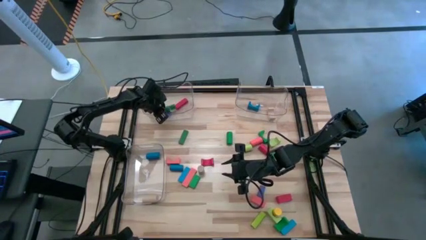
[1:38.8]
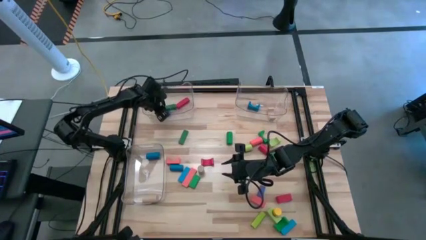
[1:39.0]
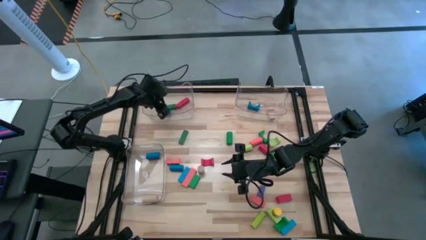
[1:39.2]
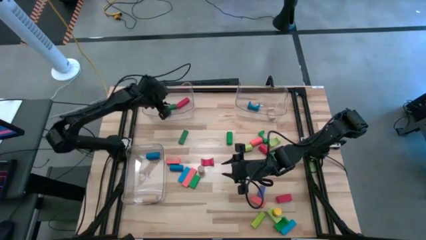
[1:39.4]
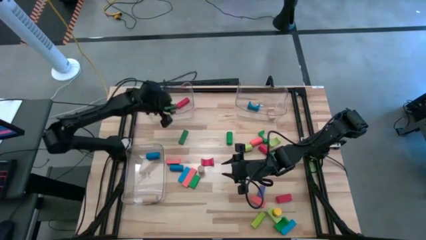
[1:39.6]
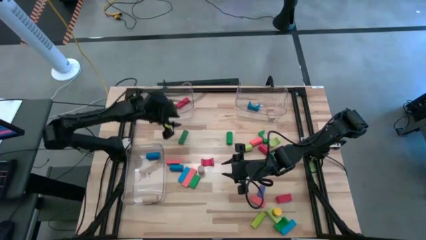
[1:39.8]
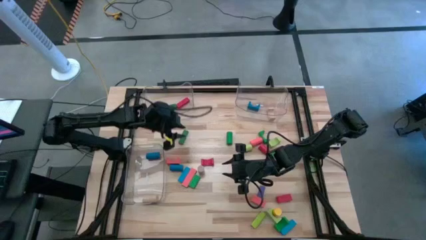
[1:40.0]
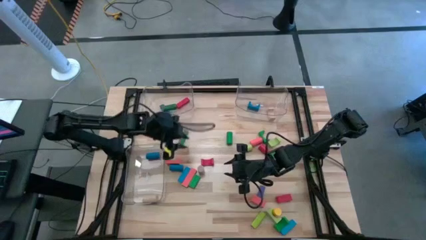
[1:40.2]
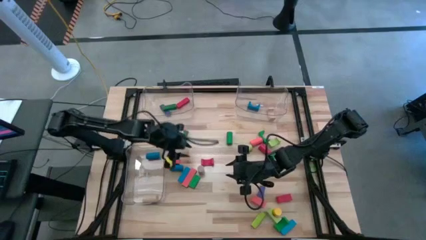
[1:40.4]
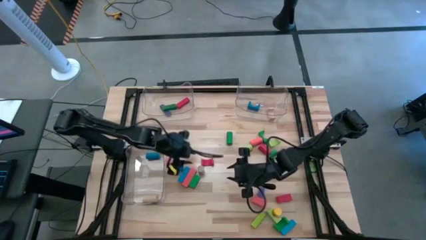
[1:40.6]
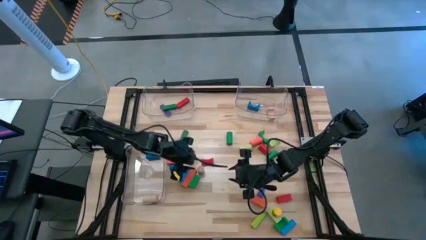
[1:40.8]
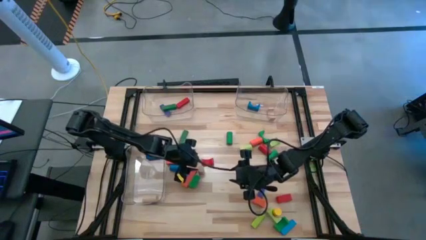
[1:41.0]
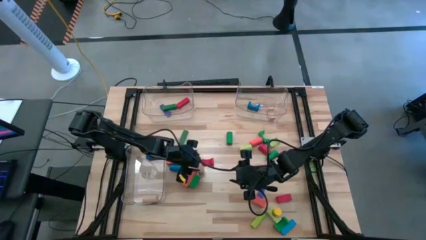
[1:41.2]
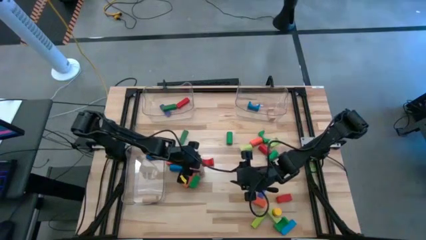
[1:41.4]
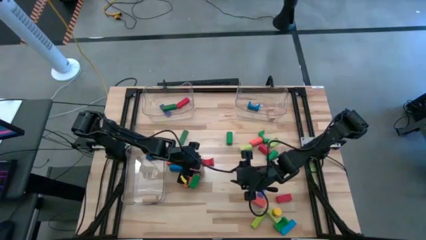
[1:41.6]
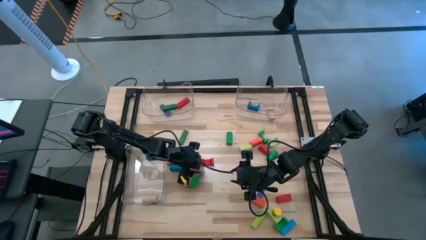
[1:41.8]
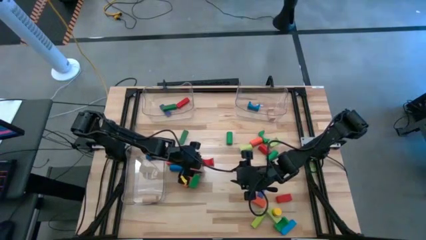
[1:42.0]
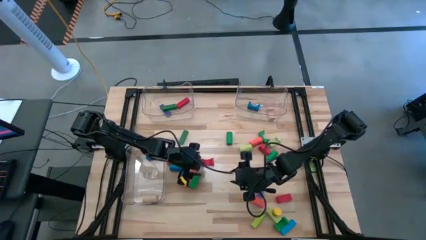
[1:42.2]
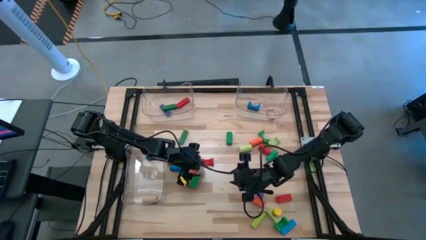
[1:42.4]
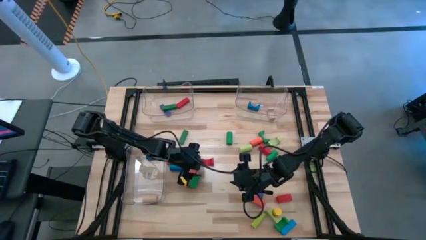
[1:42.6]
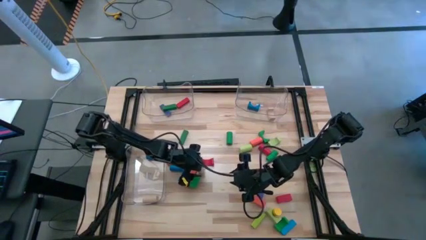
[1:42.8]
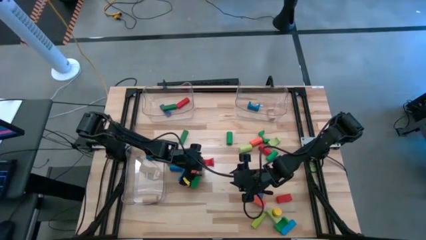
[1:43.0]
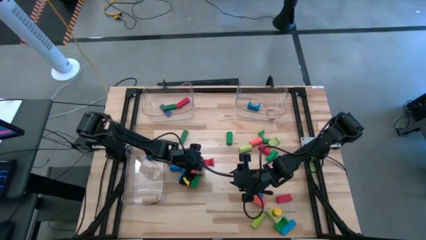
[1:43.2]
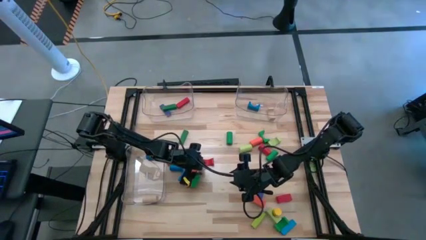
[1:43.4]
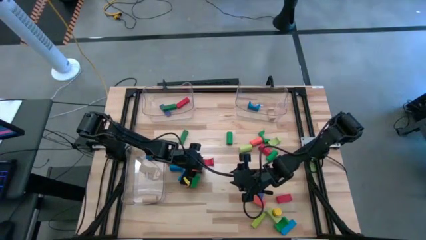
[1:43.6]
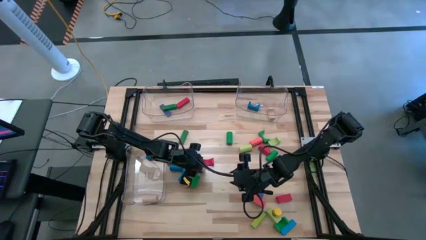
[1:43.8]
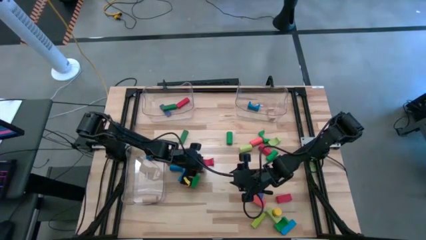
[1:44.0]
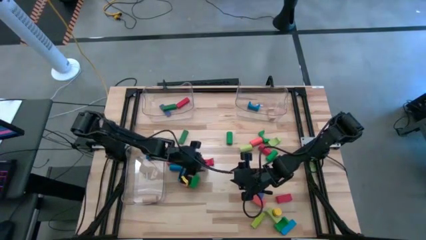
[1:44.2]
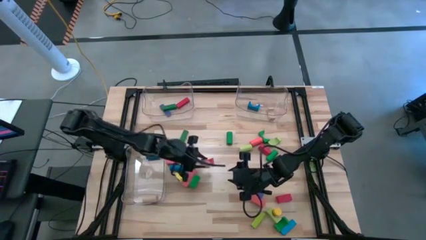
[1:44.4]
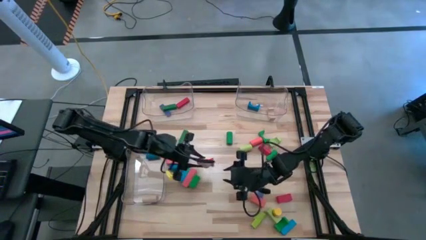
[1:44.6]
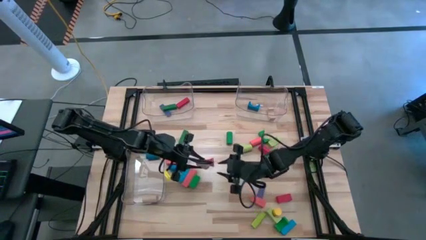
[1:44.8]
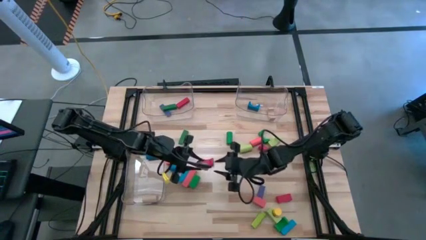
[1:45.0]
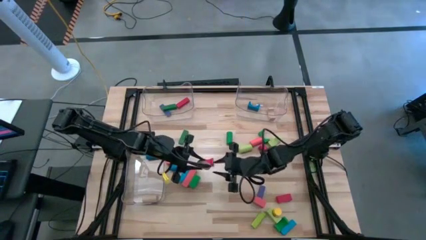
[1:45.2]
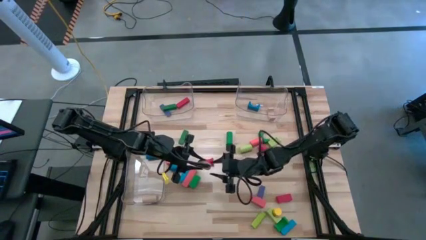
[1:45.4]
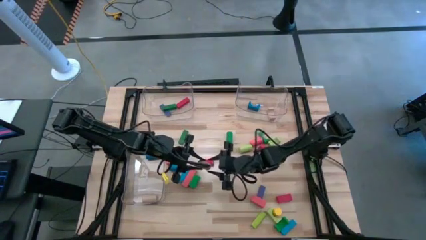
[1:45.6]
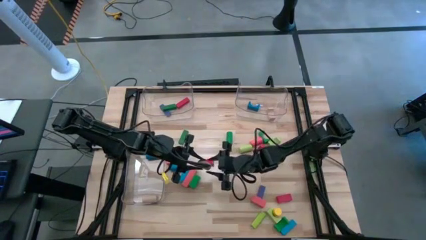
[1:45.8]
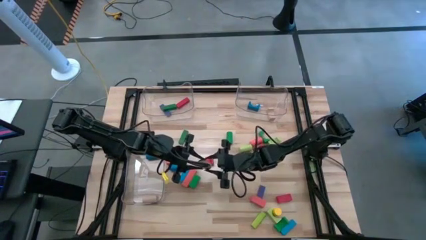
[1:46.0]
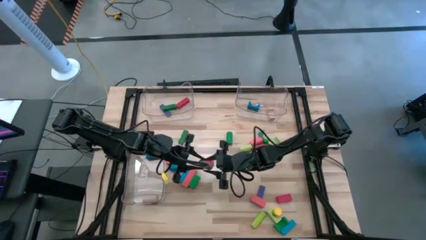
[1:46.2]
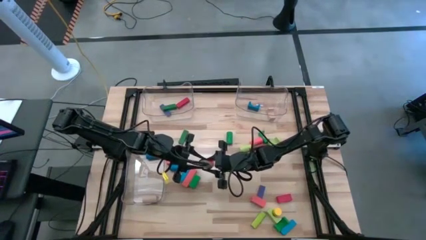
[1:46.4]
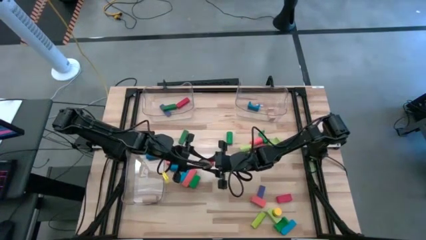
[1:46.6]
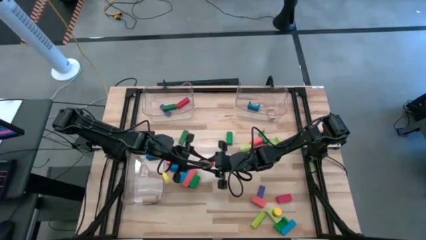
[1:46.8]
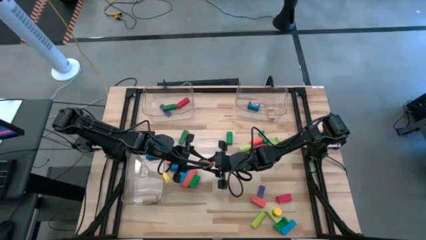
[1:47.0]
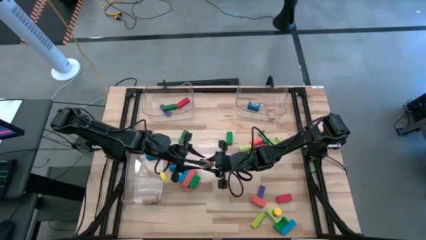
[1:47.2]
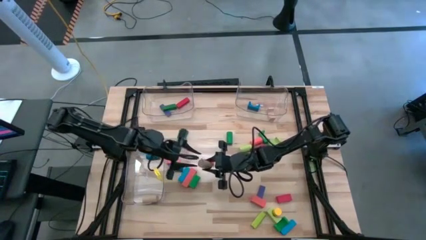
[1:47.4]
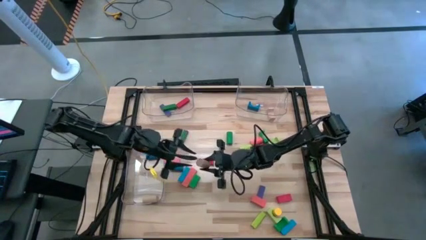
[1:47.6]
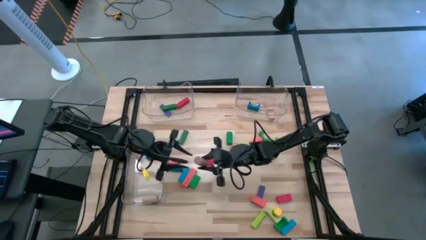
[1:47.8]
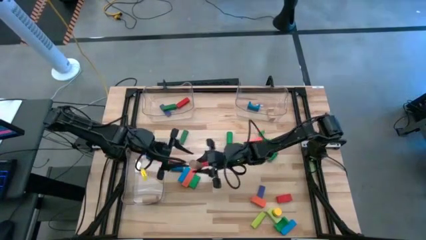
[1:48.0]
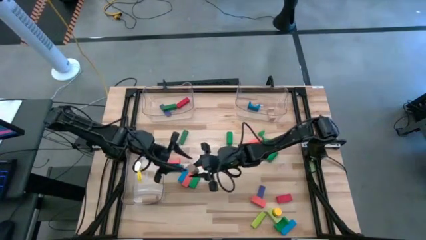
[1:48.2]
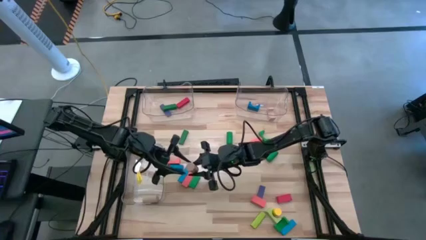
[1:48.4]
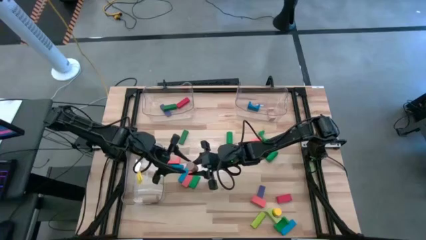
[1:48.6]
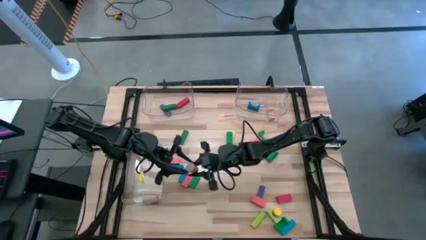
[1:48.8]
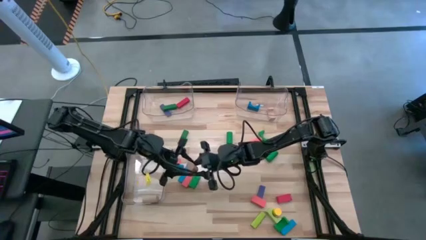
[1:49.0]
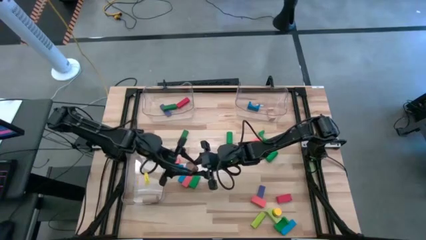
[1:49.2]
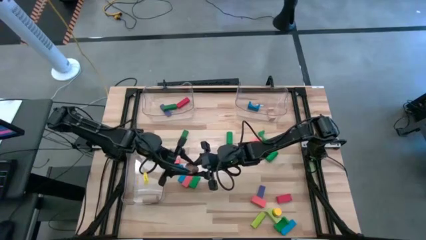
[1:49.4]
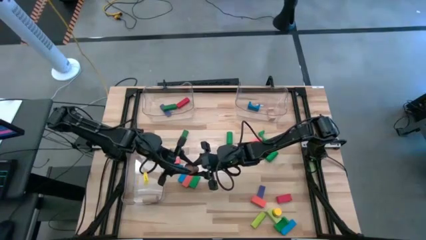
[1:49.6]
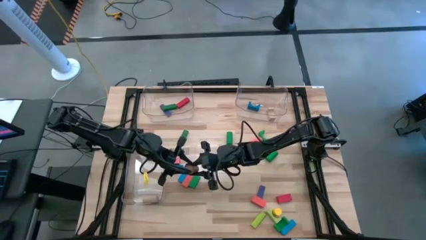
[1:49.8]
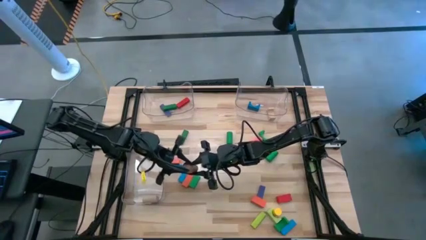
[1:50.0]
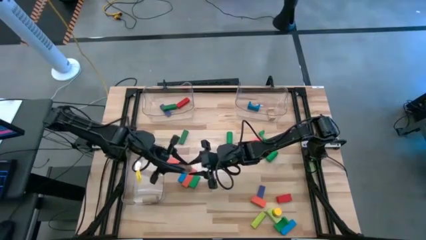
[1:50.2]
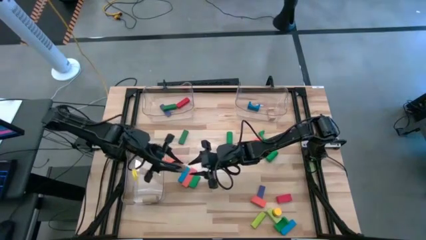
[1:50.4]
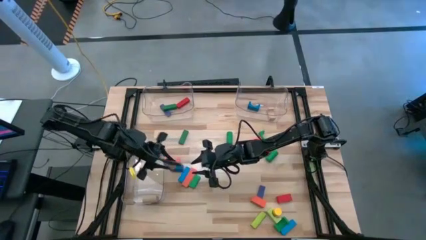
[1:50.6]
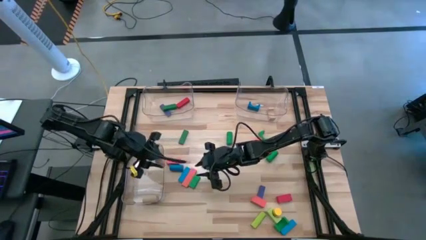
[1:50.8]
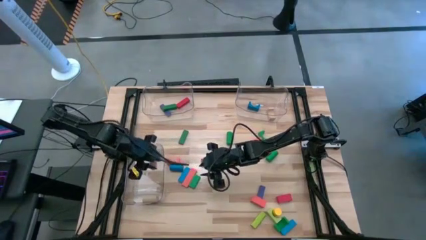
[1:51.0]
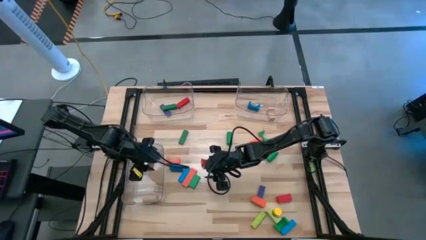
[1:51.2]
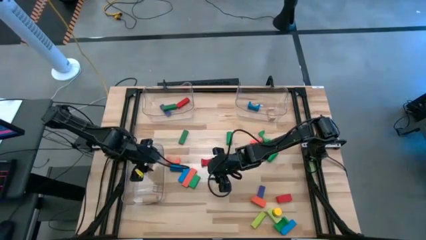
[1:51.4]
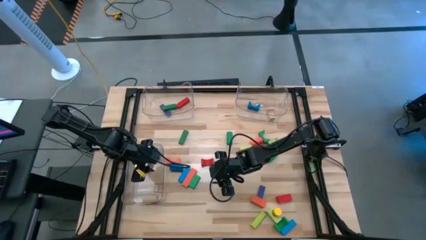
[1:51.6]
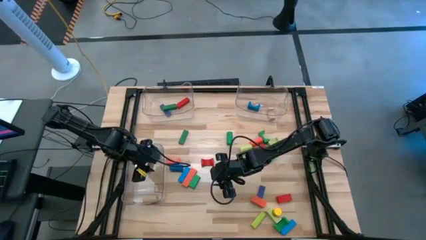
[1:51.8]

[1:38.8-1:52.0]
Task: Sort blocks by size
Put the brown cylindrical block into the bottom left transparent bin

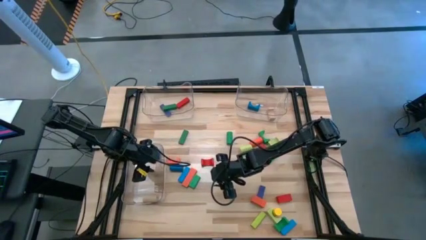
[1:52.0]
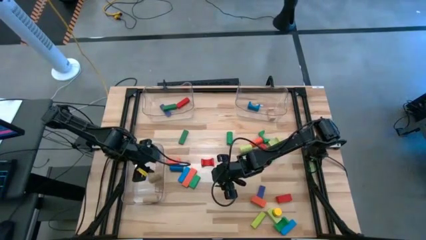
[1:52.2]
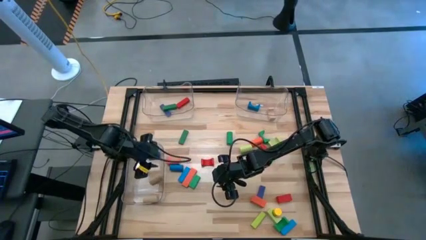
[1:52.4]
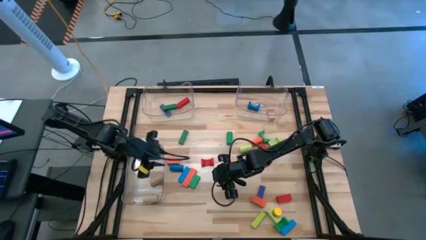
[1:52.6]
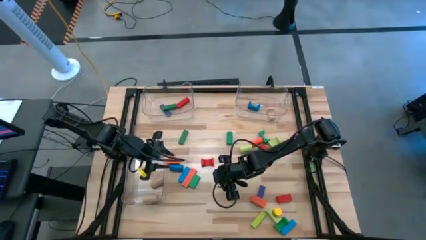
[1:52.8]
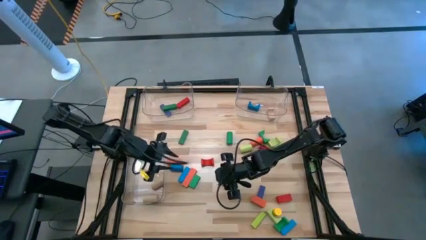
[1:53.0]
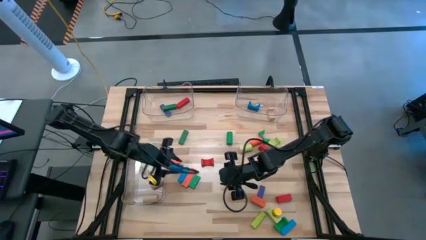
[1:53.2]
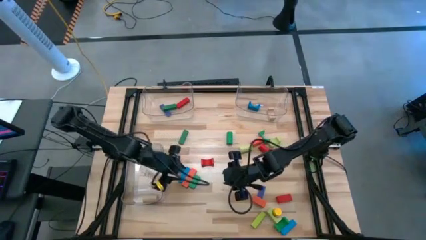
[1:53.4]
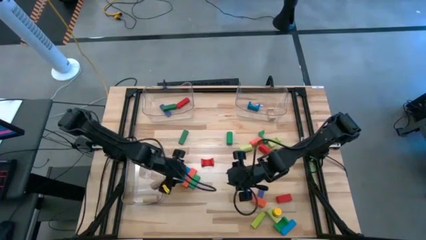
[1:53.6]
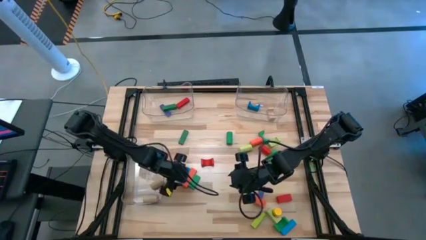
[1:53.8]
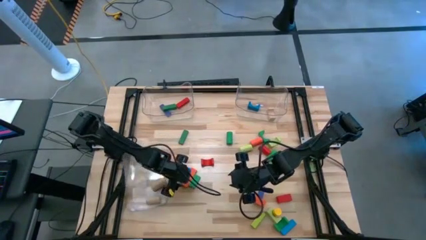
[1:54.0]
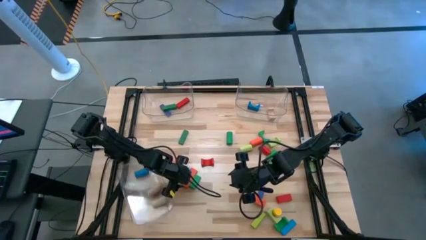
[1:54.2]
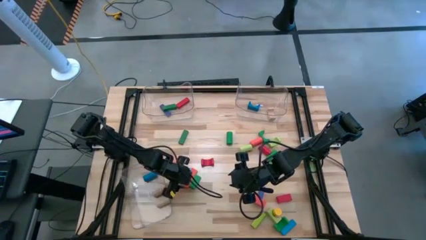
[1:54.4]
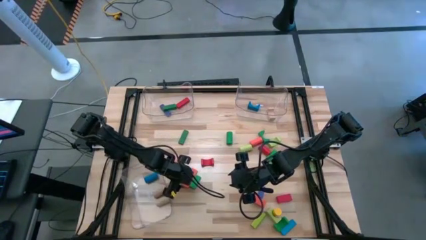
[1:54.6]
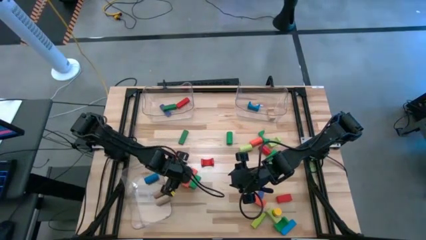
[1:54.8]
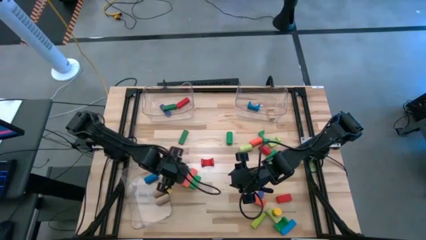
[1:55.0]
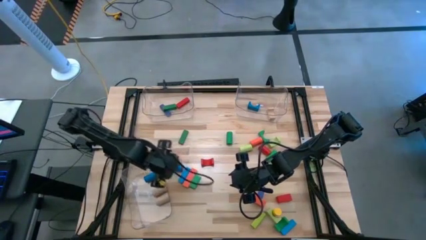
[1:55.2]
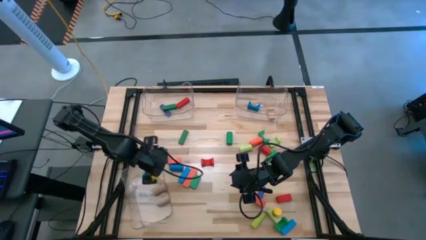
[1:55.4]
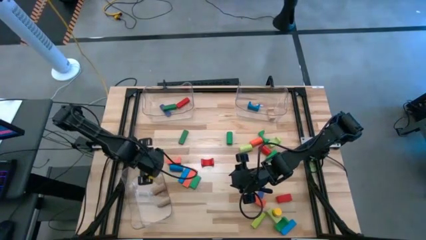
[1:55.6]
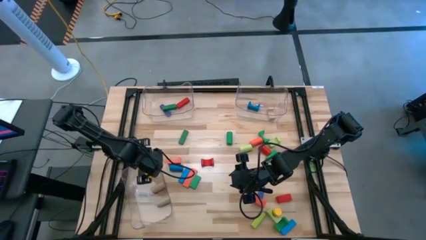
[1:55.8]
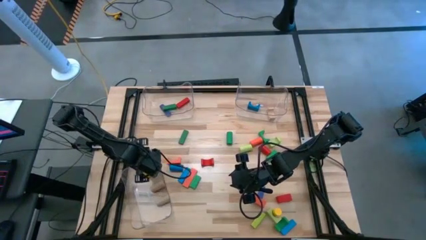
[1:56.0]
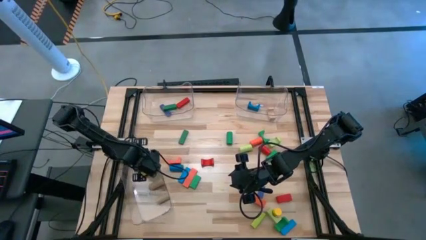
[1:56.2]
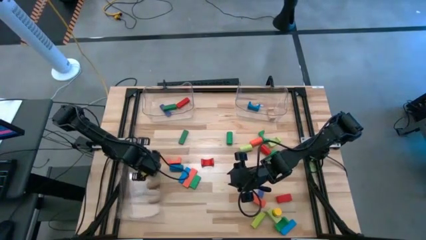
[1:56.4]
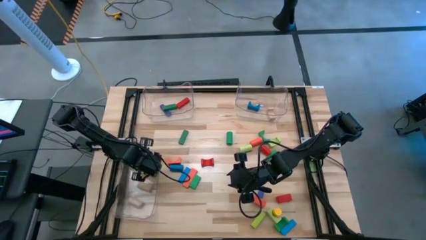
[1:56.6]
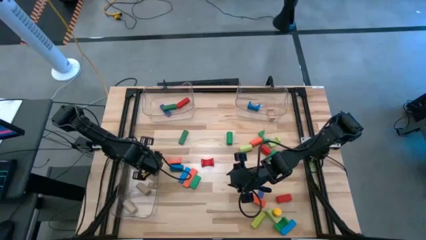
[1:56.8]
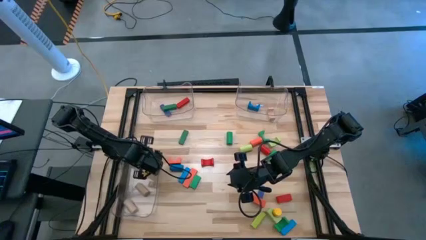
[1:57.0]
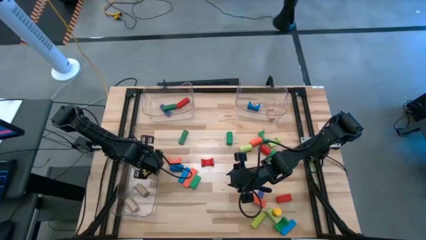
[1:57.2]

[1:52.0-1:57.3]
Adjust the bottom left transparent bin
